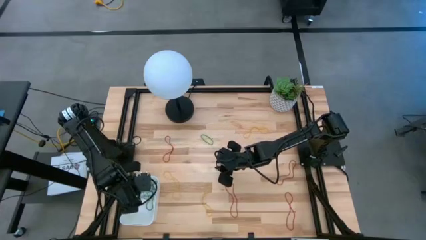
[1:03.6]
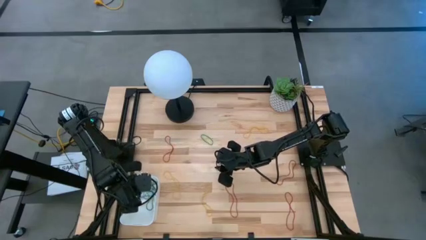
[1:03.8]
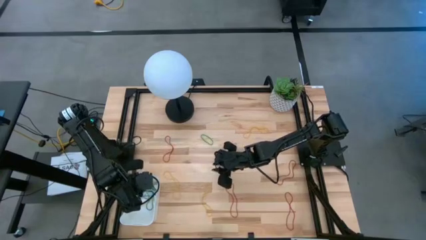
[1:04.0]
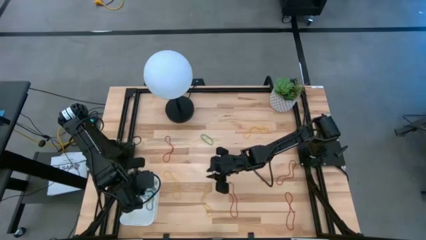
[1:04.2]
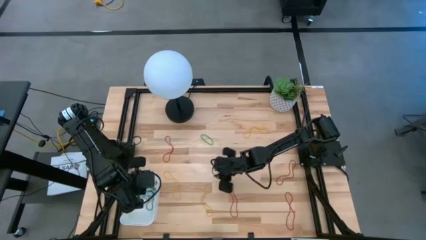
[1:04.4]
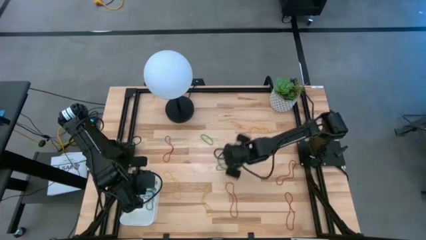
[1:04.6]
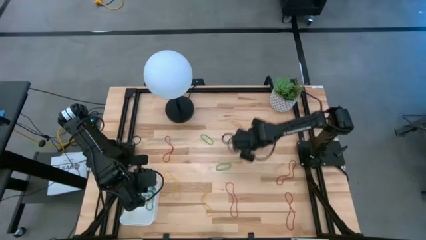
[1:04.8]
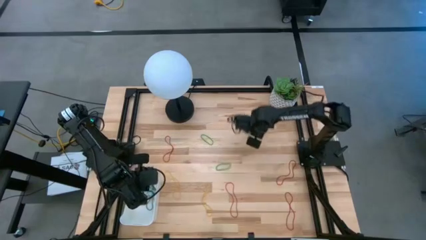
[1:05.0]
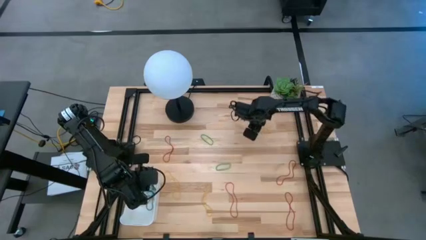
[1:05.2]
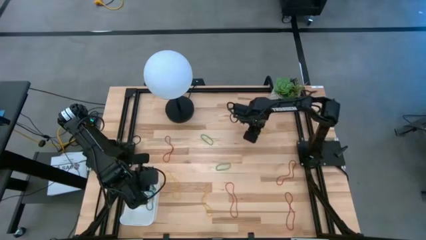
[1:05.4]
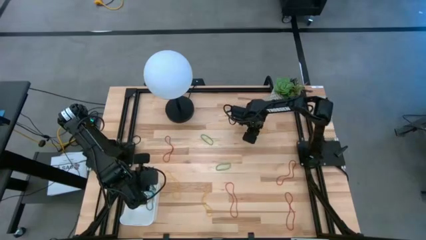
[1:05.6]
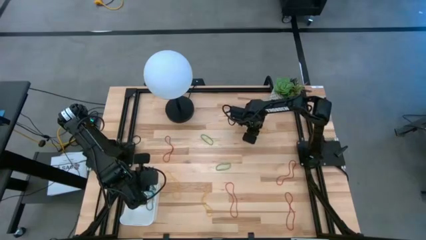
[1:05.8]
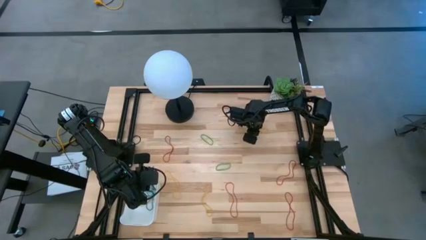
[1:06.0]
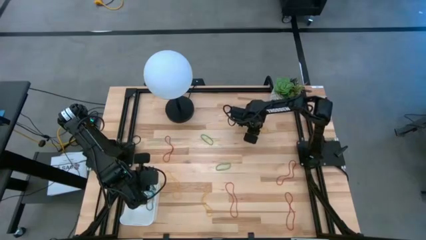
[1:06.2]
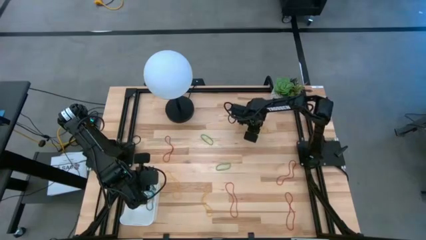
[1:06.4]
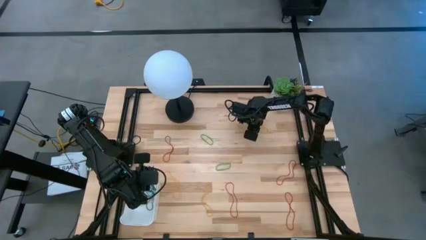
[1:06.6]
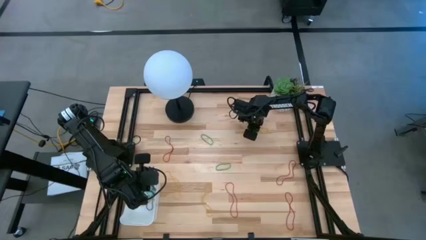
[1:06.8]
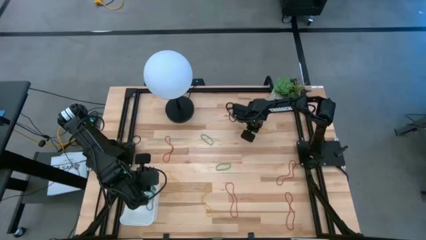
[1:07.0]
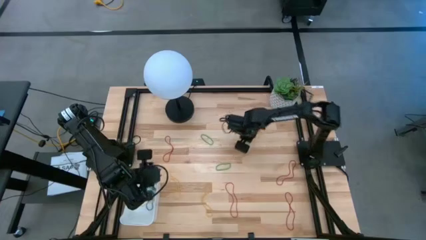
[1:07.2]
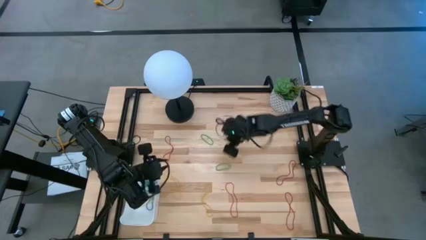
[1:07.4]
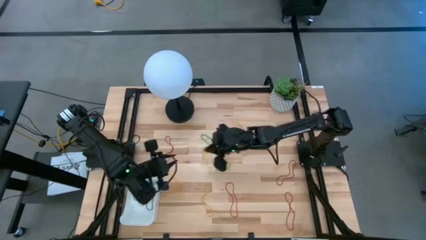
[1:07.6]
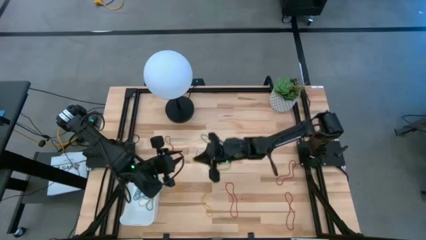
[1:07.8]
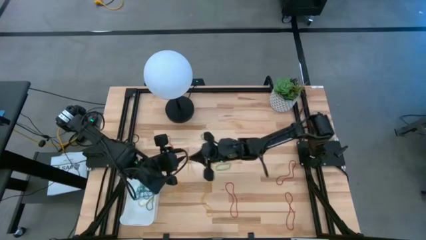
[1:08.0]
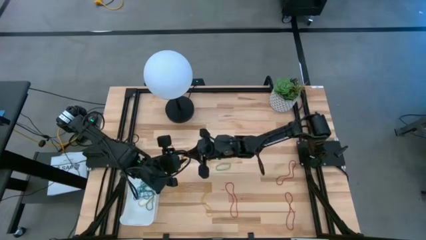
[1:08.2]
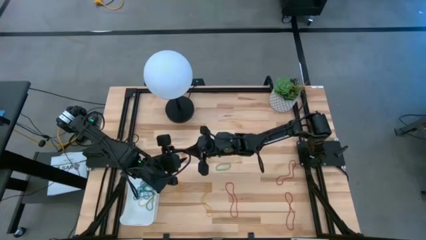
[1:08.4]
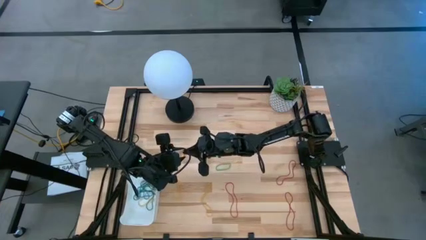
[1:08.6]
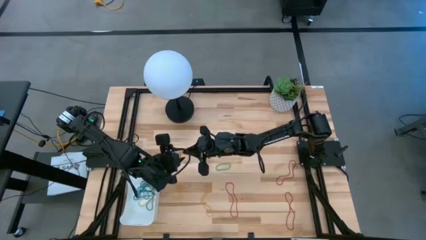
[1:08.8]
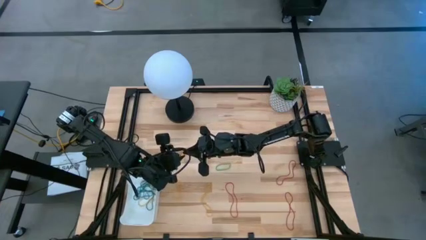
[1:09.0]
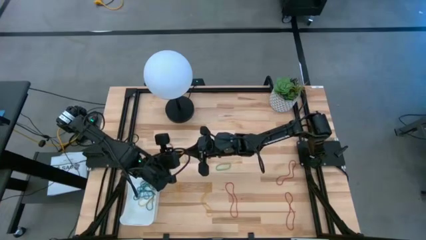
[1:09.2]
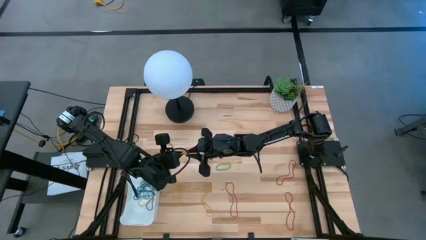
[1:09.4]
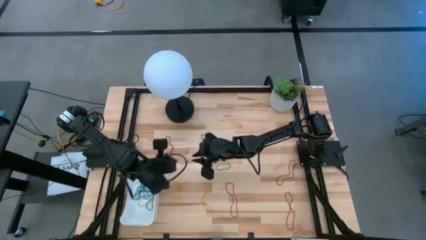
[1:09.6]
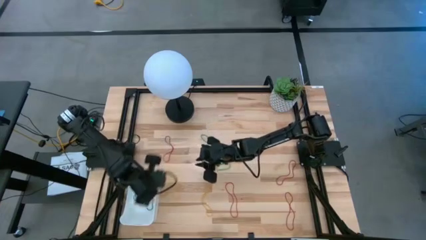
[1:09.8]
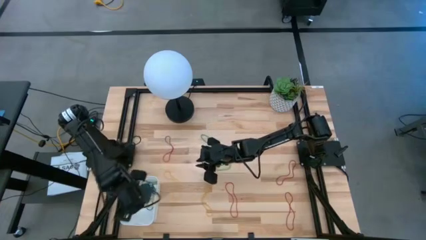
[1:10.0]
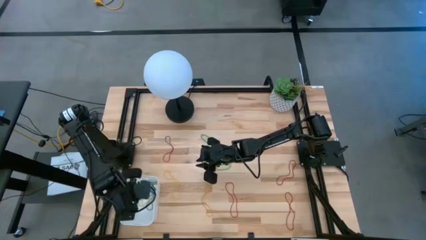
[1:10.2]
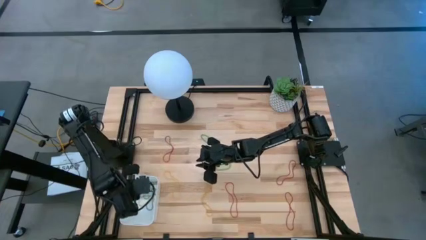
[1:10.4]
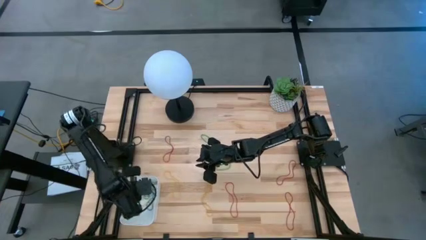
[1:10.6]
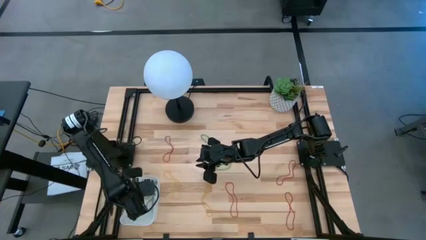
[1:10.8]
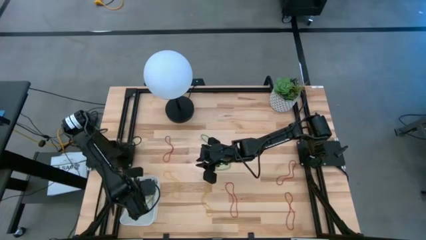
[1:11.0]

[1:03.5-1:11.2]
Task: Pick and place items into bin
Put the top yellow rubber band into the white bin

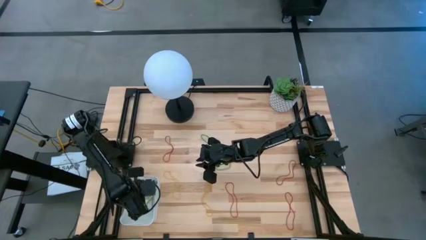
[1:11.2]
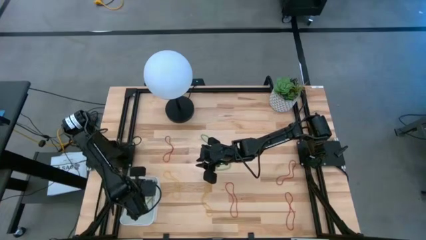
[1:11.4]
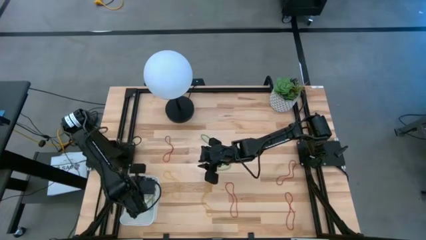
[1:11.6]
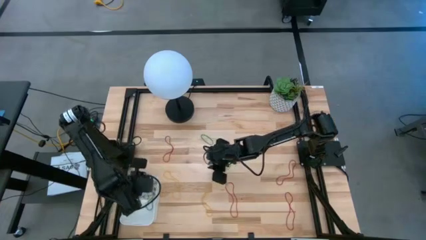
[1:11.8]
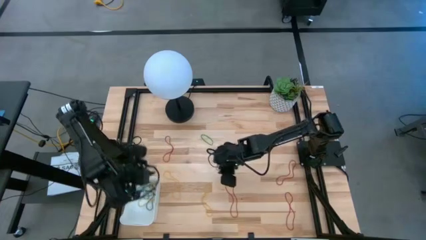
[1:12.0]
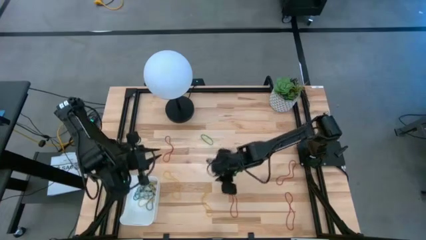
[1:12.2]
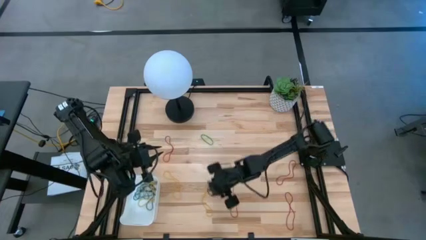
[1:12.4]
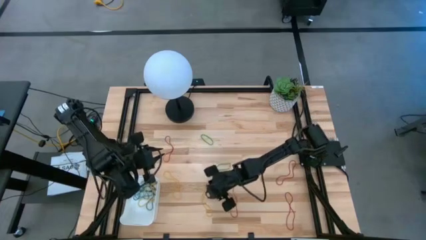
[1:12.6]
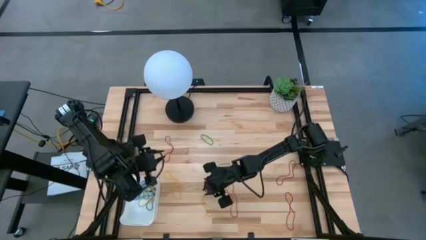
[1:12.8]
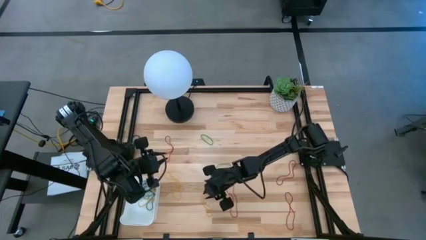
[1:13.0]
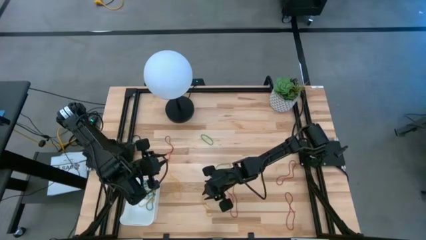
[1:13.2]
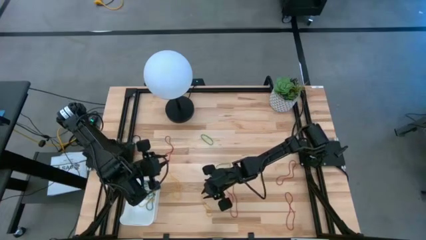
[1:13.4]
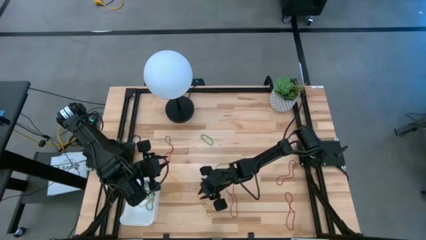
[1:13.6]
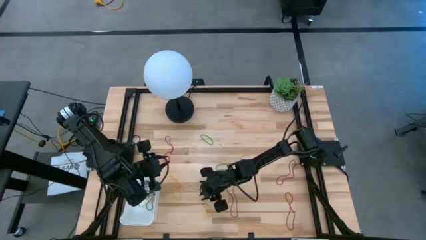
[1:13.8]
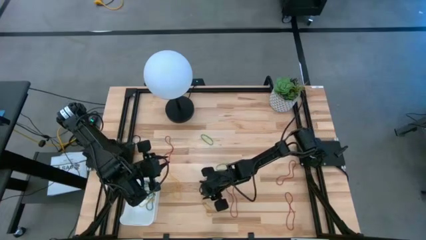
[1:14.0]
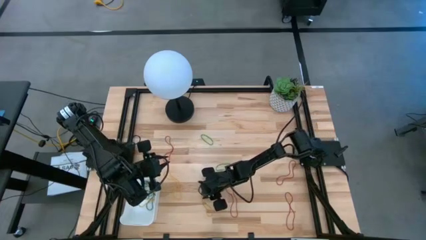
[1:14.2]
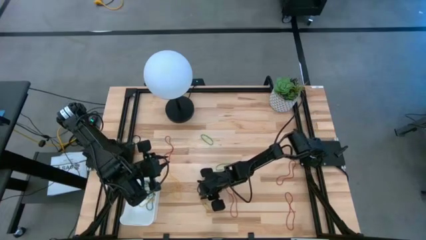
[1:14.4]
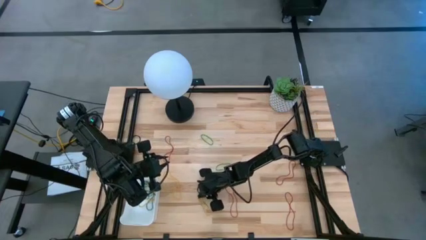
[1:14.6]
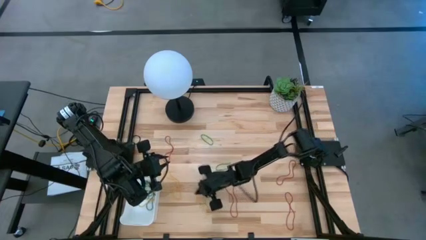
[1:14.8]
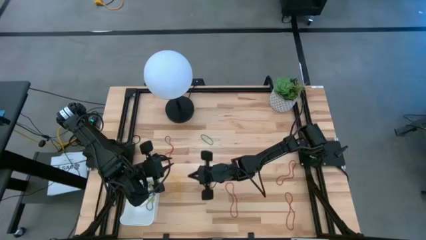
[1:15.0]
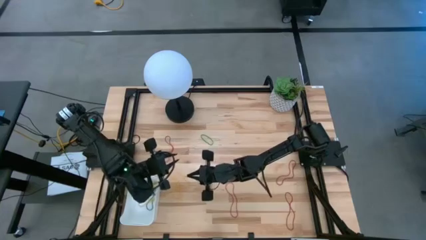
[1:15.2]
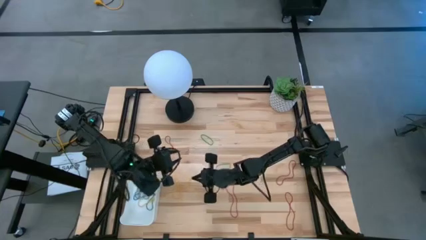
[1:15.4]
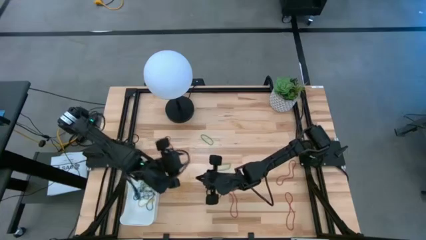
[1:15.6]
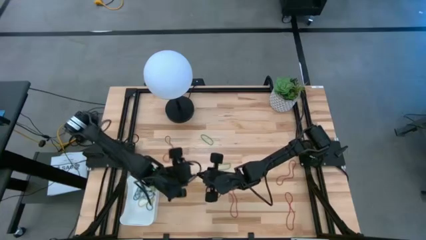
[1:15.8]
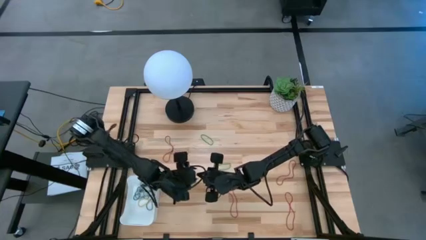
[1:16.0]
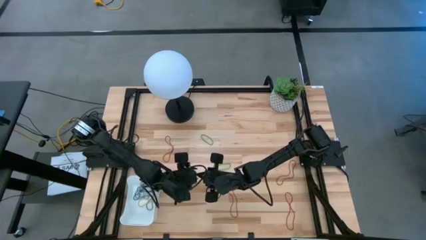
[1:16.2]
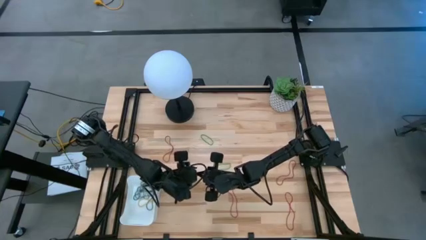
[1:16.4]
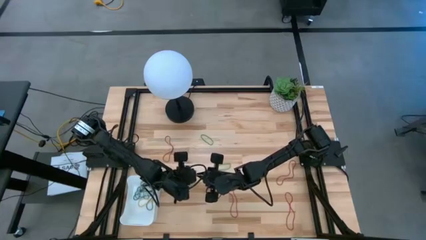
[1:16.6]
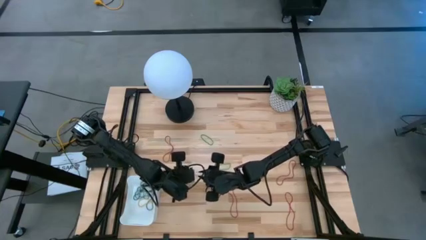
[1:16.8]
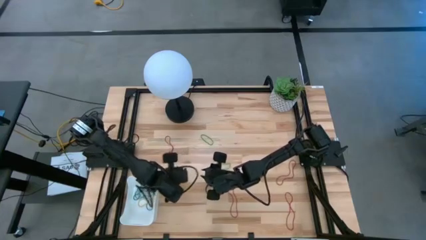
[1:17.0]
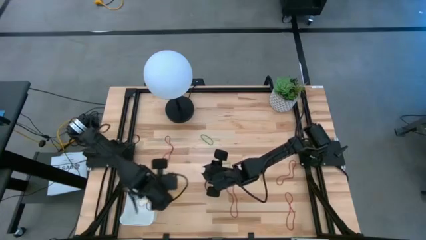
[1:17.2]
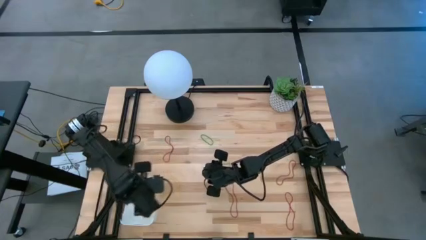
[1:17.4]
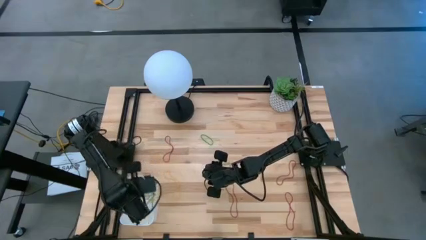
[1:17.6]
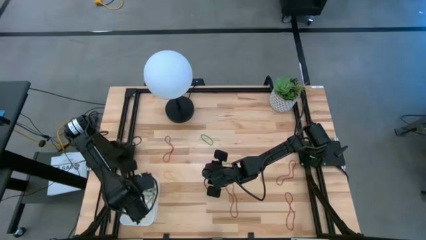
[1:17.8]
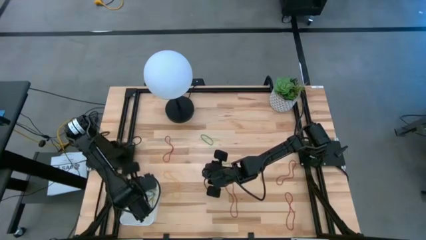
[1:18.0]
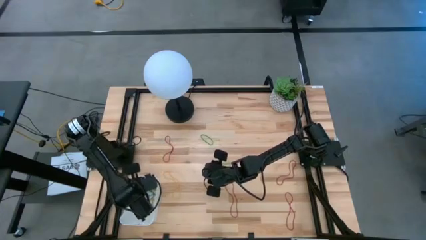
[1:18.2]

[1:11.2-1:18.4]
Put the right yellow rubber band into the white bin

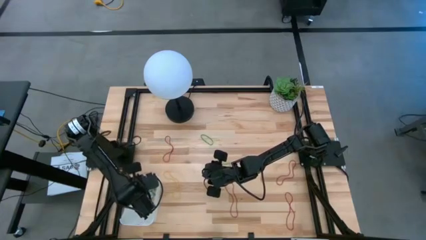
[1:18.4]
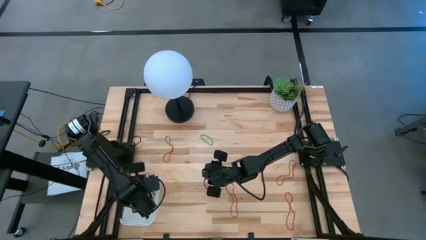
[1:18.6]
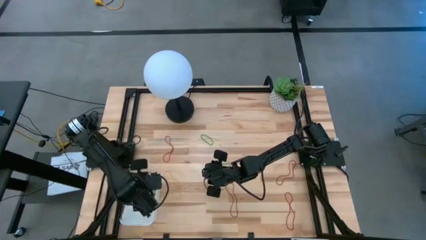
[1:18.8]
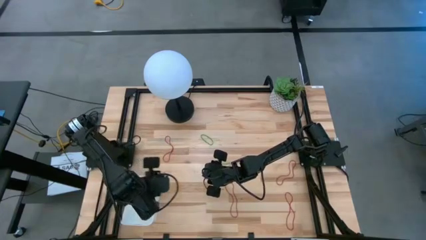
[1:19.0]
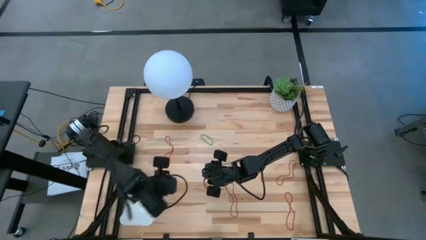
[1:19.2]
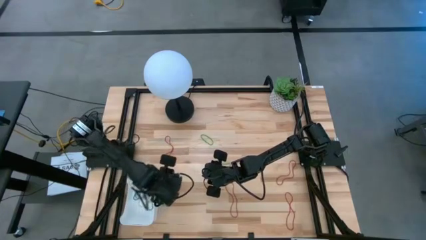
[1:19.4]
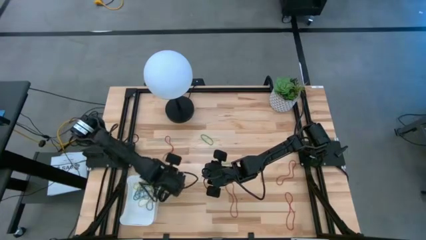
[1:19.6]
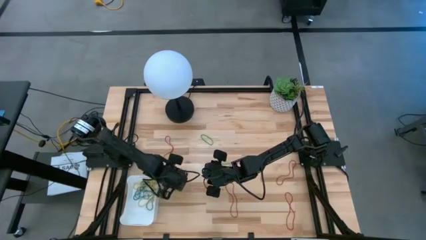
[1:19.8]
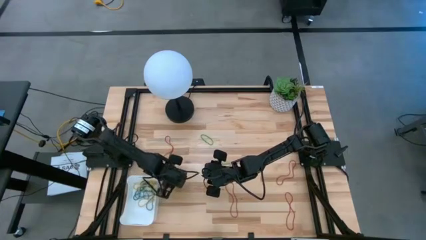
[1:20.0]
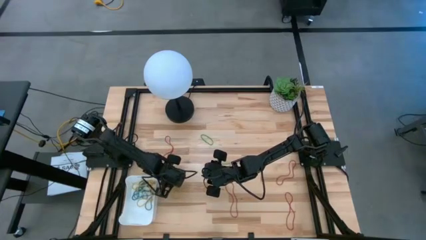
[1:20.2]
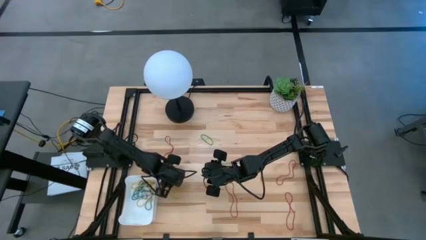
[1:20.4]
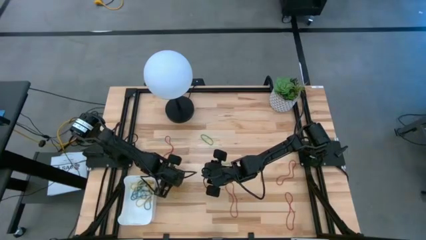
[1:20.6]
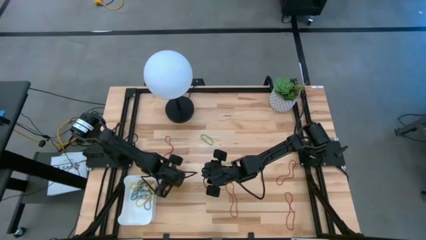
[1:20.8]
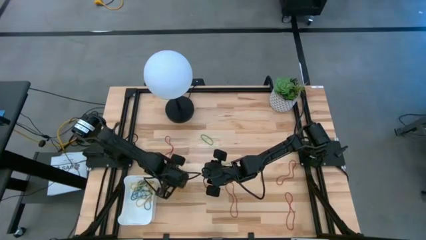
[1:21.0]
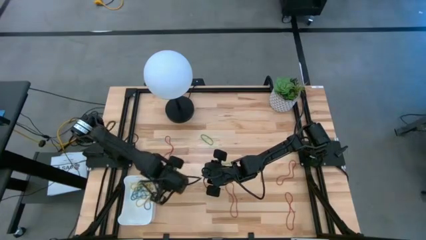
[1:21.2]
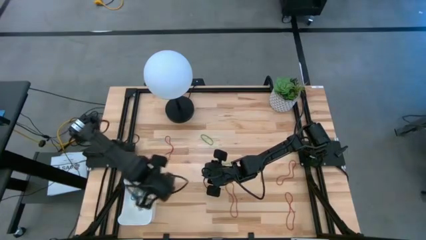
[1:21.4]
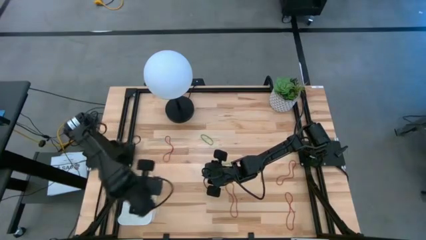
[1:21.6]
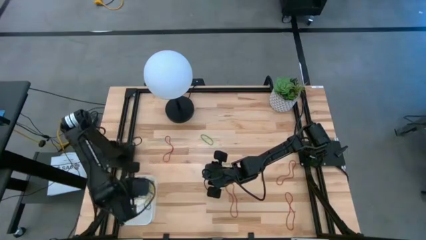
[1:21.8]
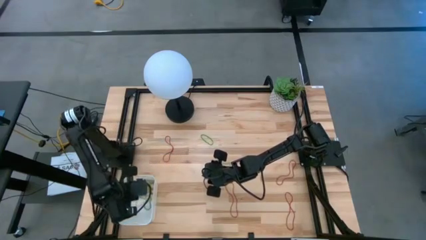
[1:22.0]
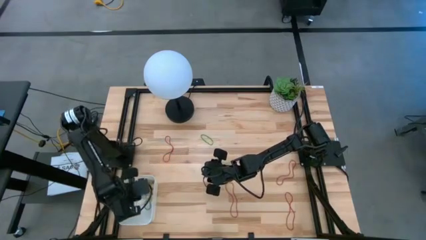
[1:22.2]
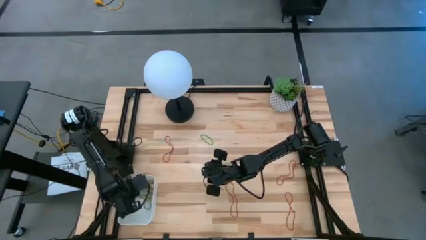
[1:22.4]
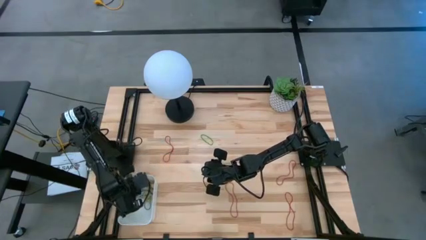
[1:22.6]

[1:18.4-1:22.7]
Put the yellow rubber band into the white bin
